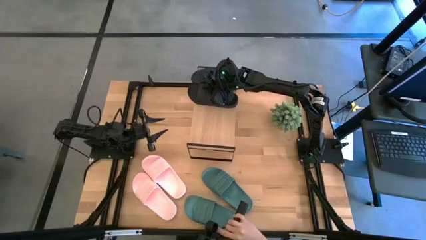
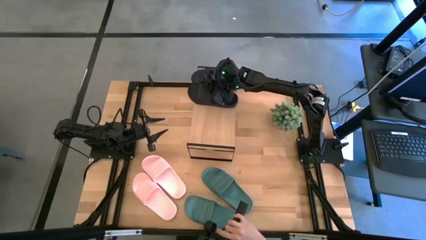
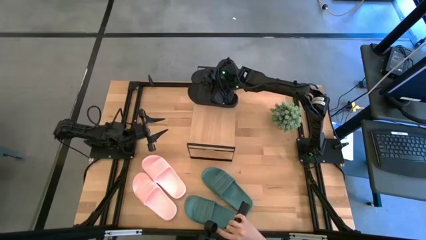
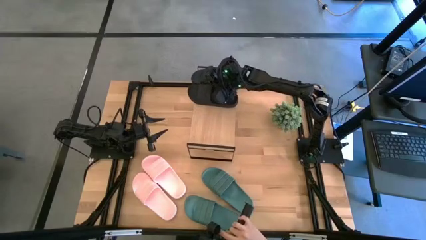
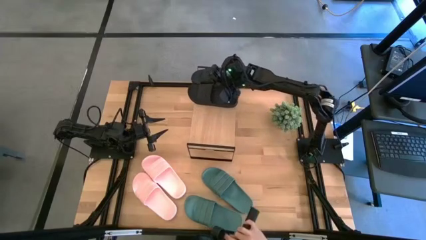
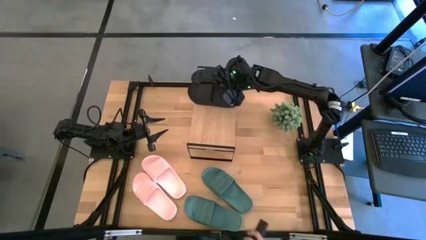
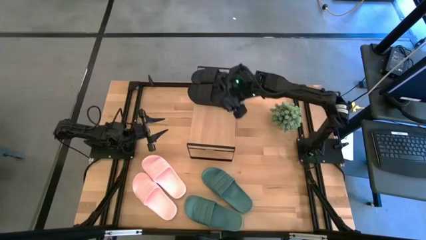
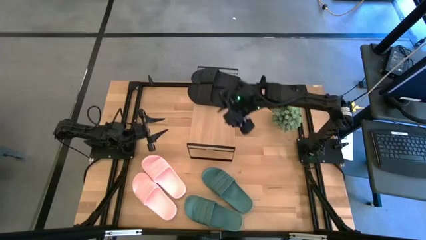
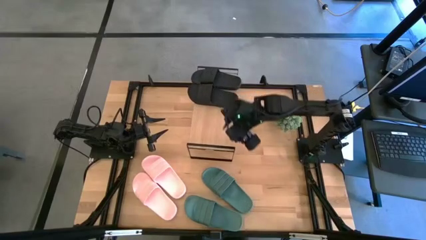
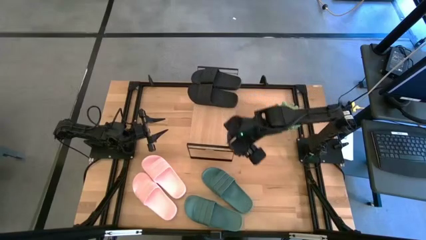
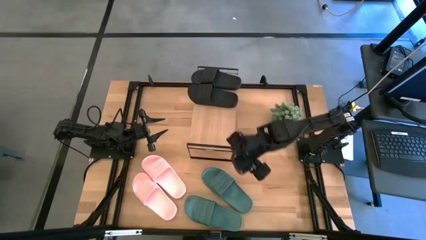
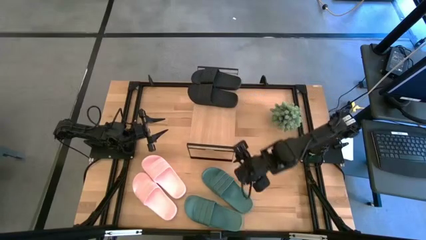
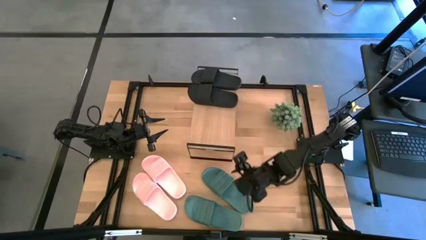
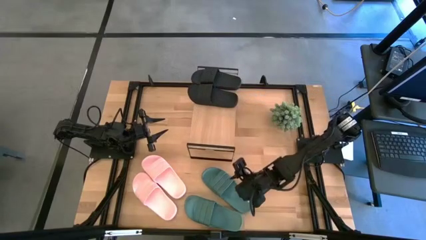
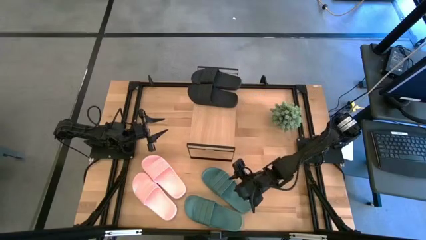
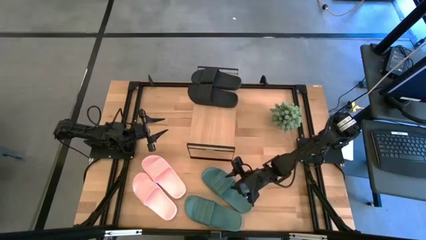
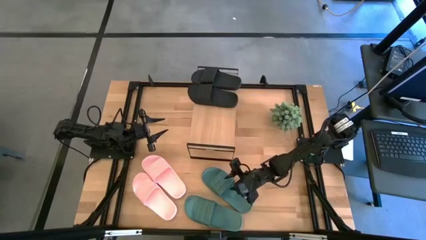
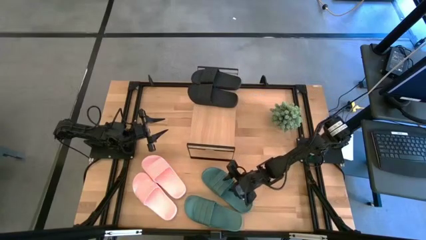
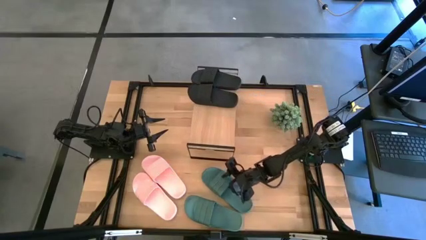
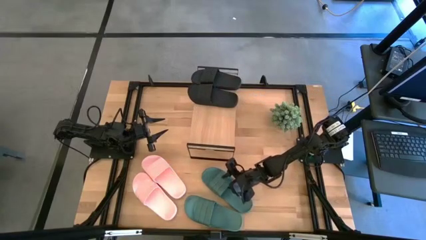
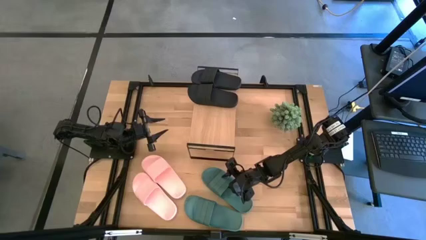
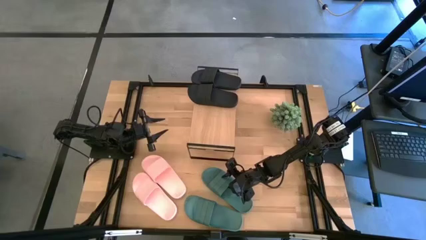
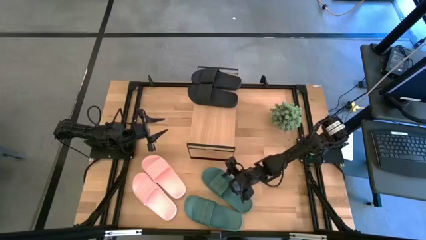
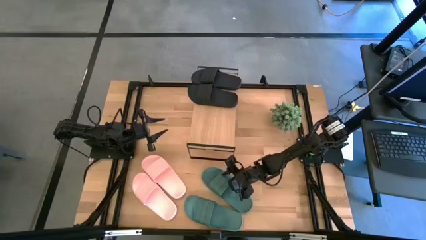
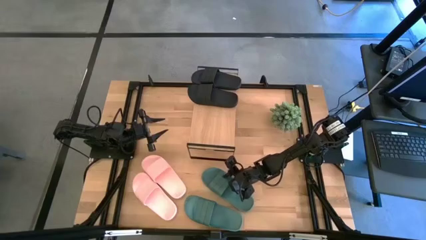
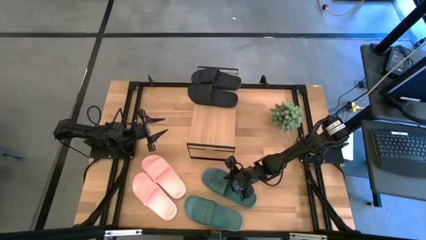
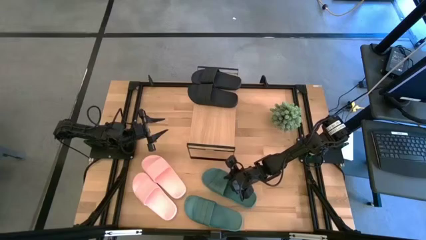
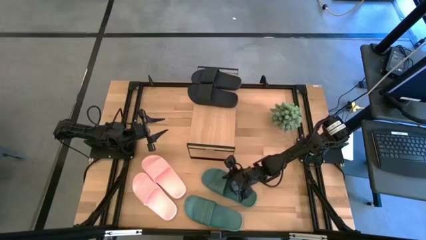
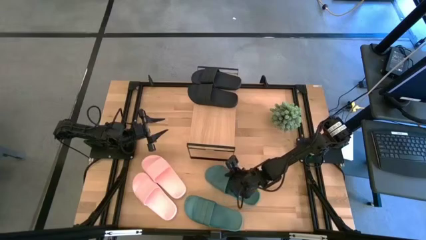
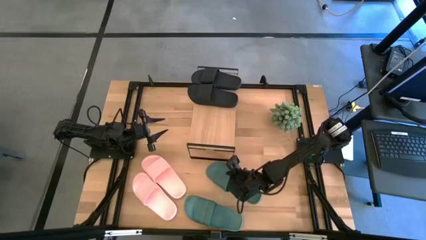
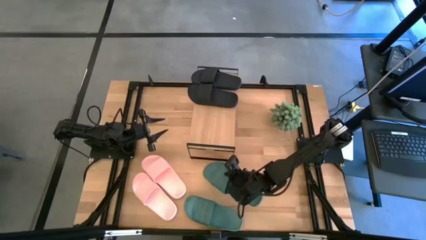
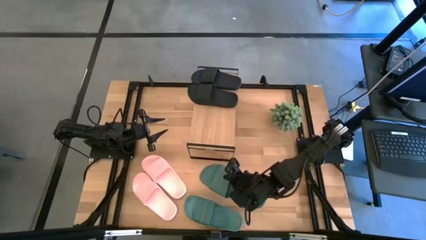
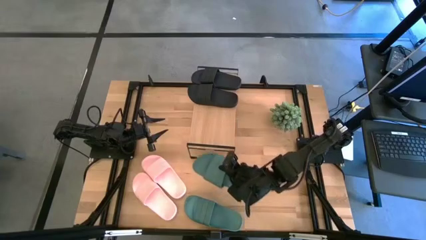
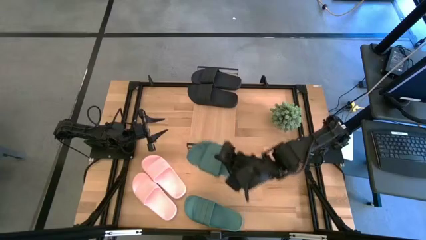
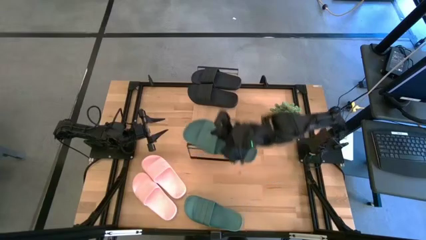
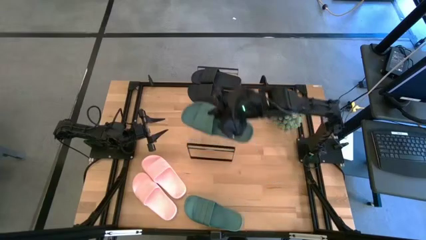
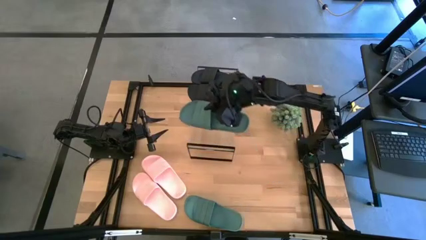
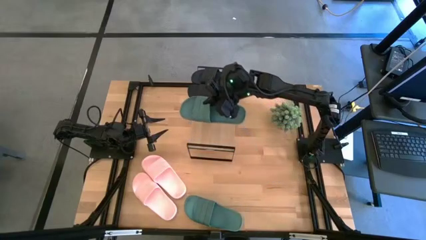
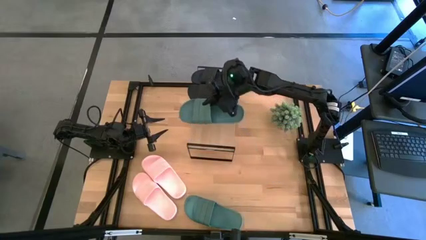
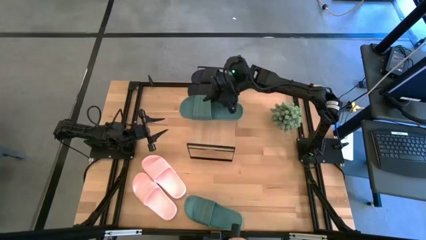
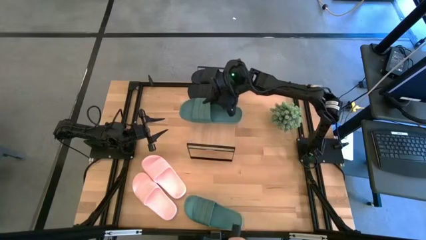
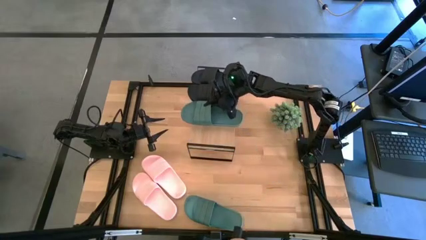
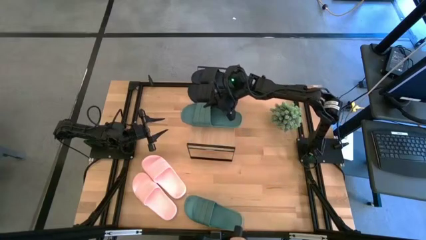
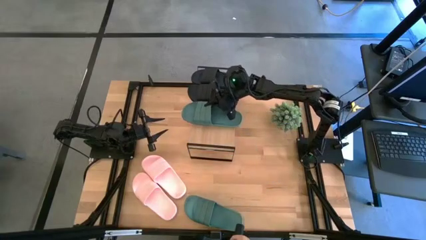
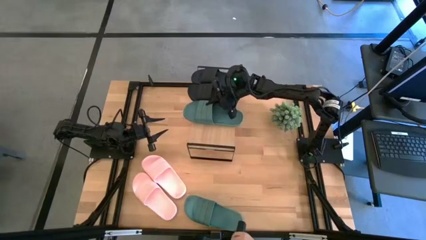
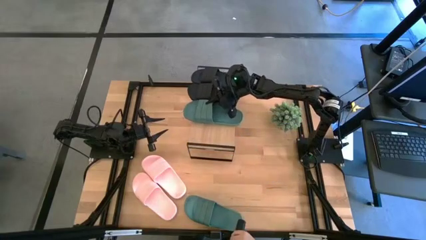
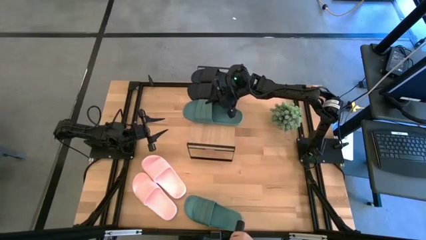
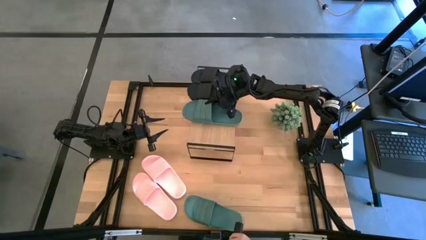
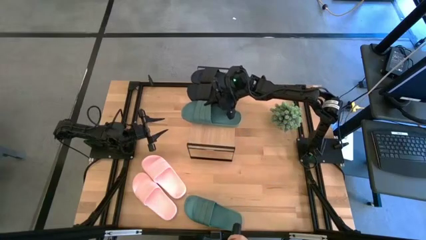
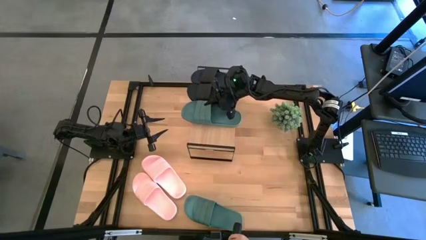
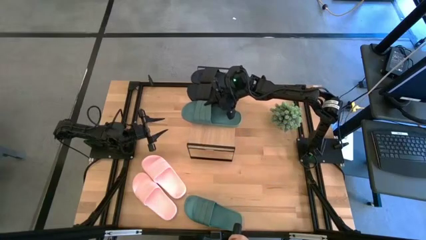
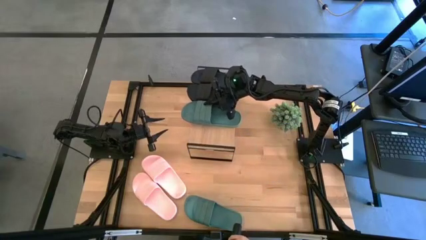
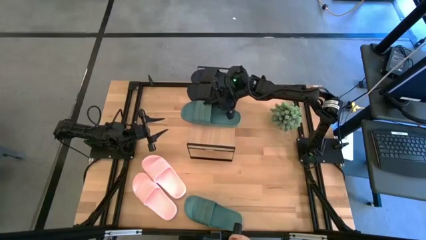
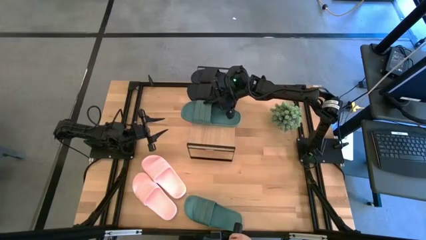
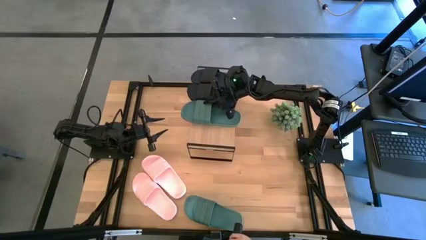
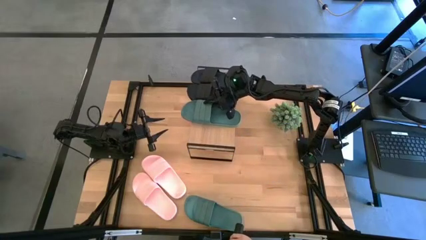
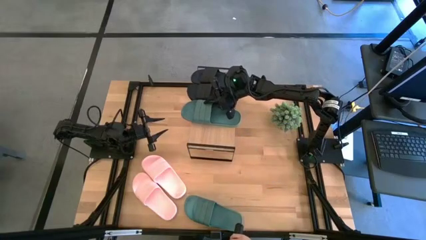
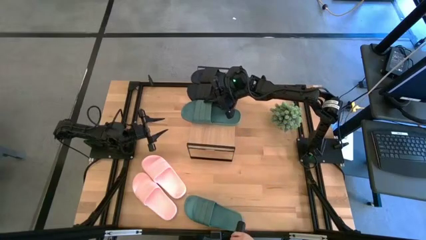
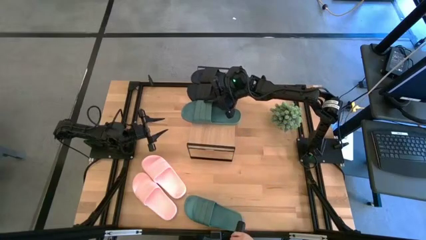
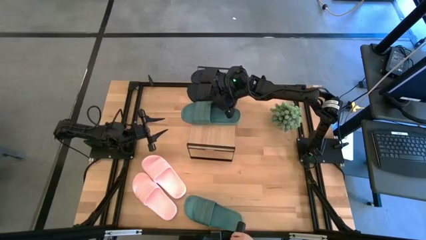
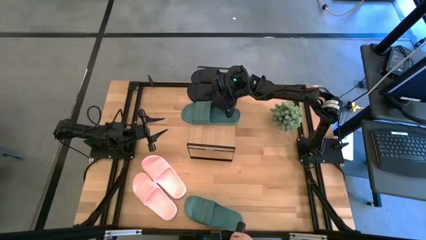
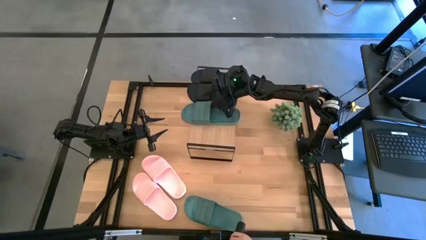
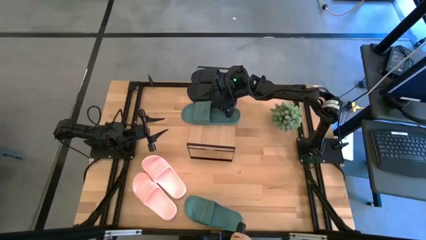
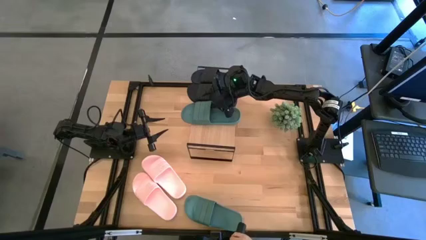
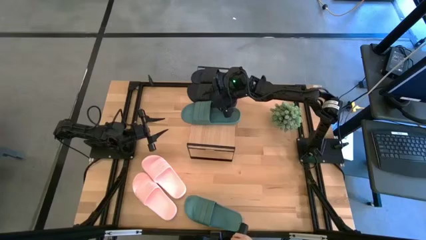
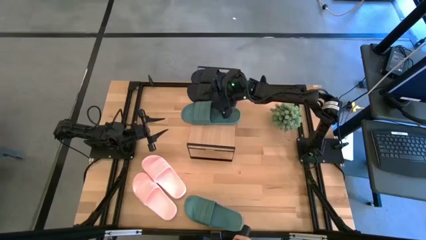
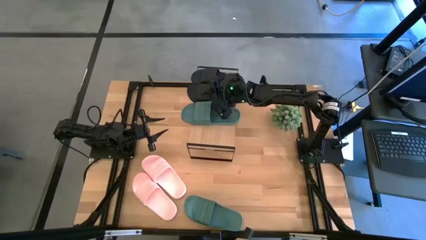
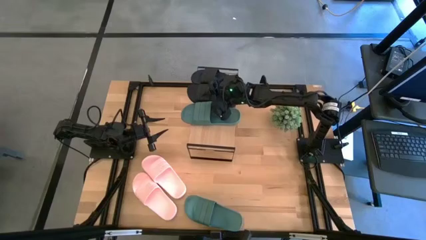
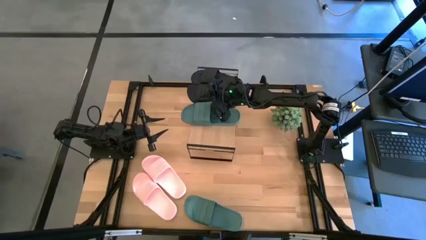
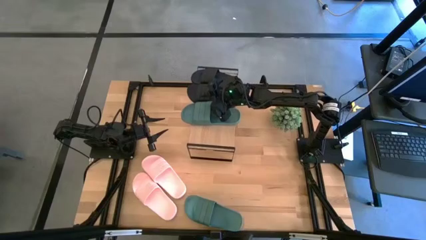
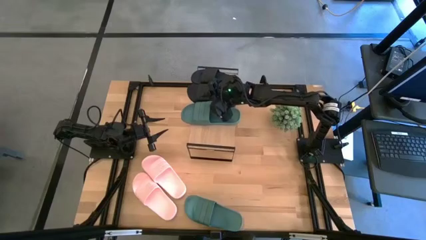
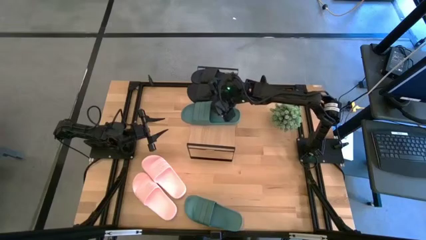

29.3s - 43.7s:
Task: Pick and place slides into the shelf
Put the top blue slipper on the shelf
